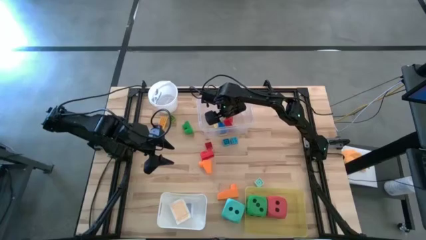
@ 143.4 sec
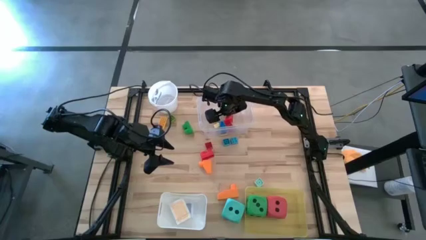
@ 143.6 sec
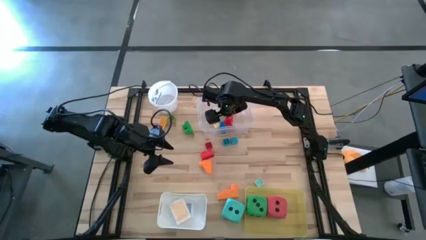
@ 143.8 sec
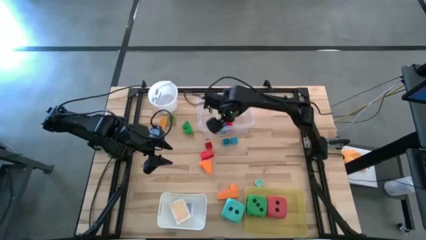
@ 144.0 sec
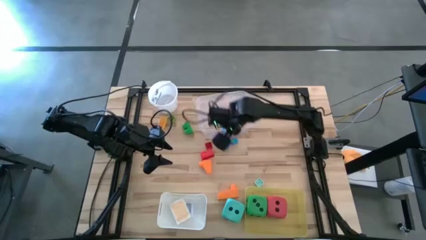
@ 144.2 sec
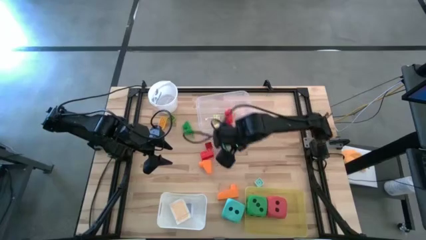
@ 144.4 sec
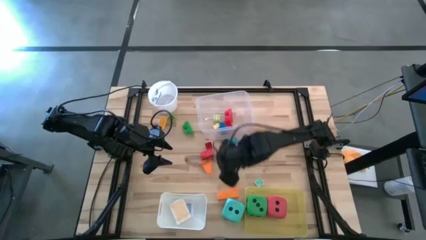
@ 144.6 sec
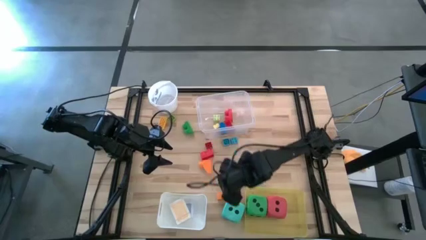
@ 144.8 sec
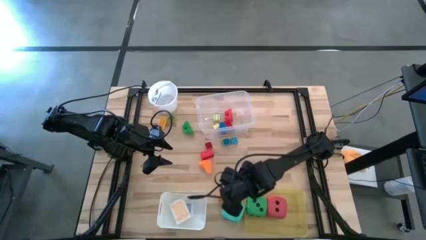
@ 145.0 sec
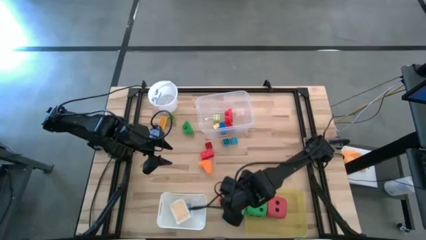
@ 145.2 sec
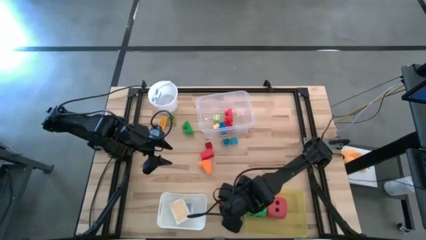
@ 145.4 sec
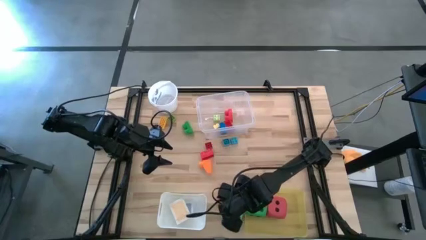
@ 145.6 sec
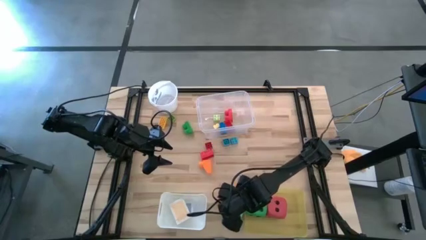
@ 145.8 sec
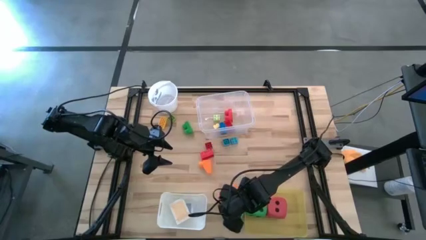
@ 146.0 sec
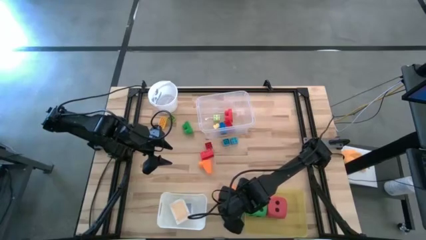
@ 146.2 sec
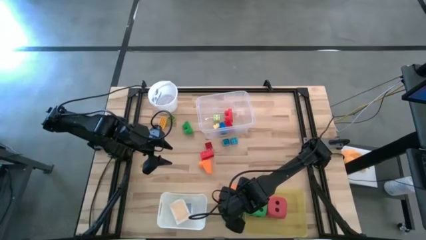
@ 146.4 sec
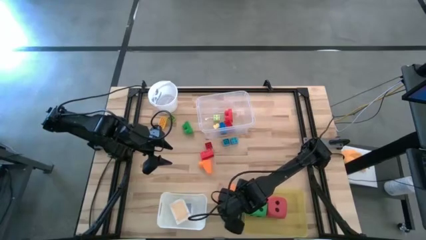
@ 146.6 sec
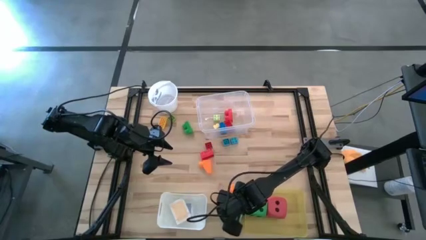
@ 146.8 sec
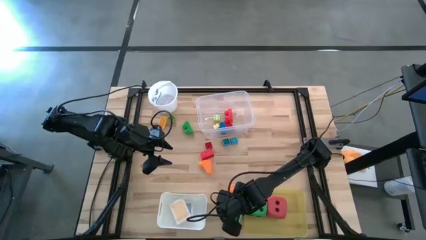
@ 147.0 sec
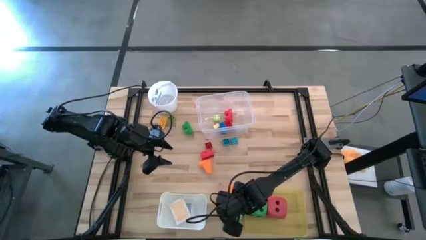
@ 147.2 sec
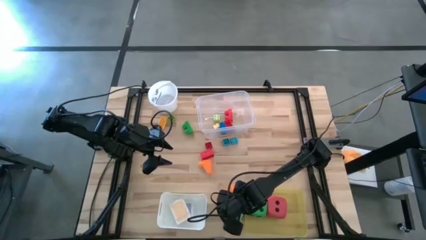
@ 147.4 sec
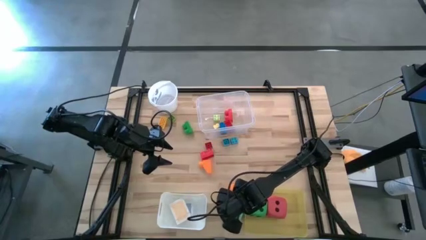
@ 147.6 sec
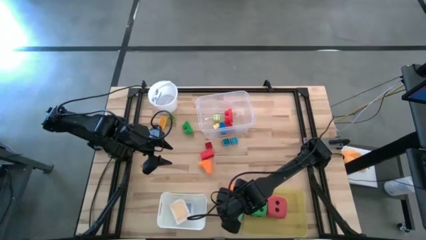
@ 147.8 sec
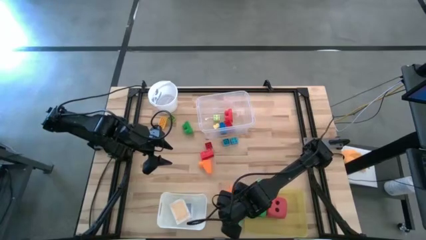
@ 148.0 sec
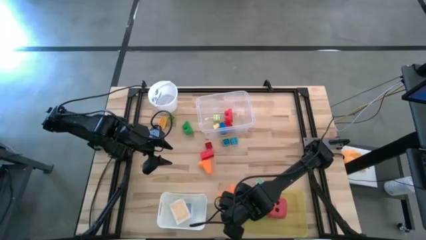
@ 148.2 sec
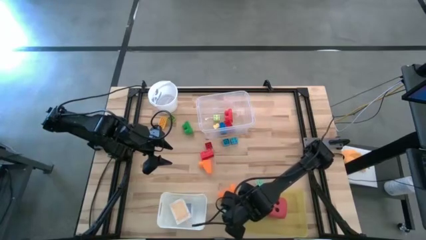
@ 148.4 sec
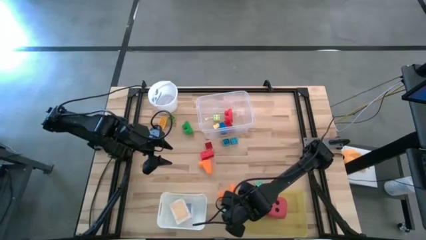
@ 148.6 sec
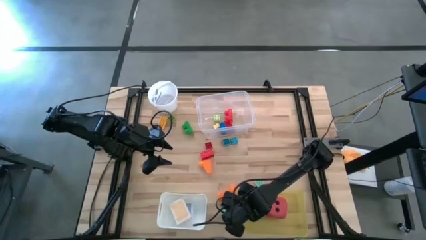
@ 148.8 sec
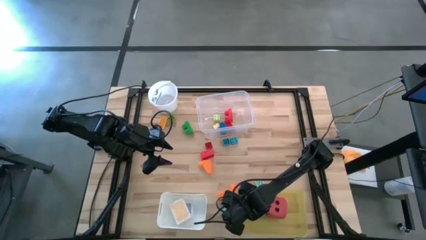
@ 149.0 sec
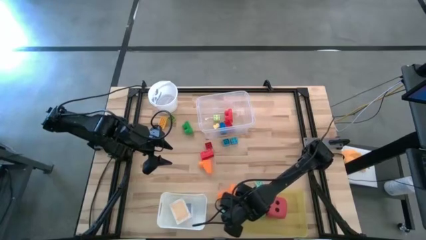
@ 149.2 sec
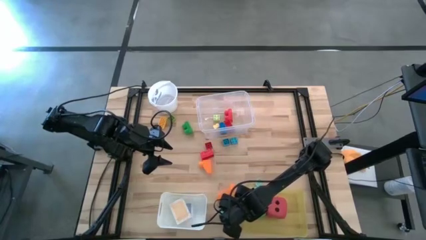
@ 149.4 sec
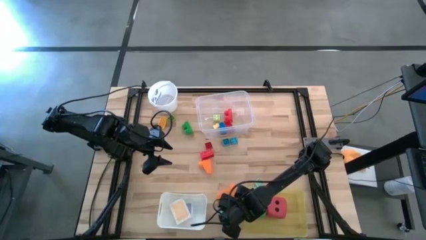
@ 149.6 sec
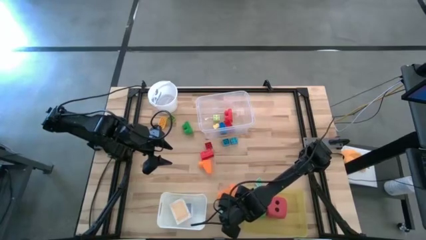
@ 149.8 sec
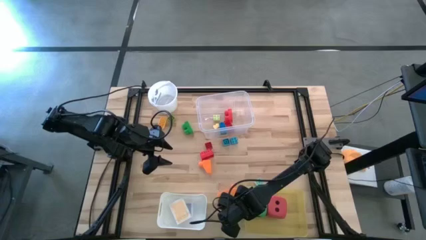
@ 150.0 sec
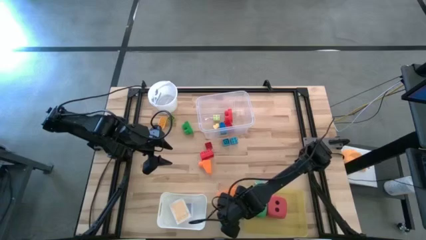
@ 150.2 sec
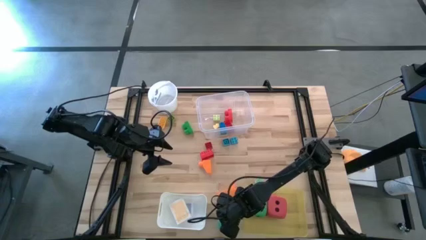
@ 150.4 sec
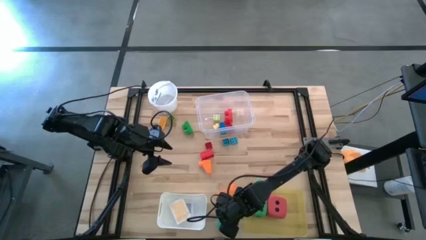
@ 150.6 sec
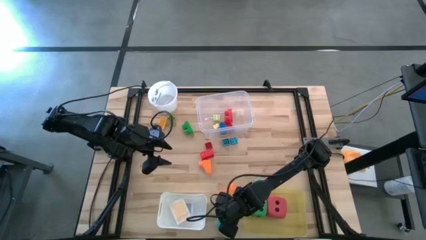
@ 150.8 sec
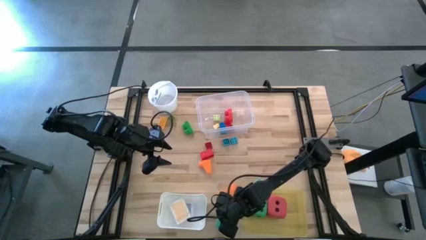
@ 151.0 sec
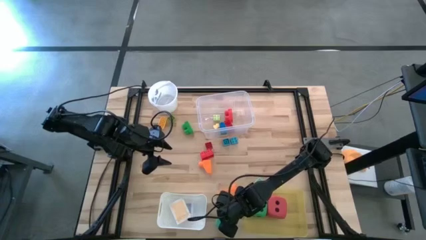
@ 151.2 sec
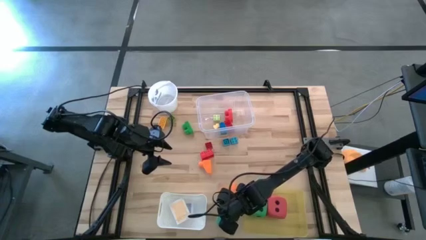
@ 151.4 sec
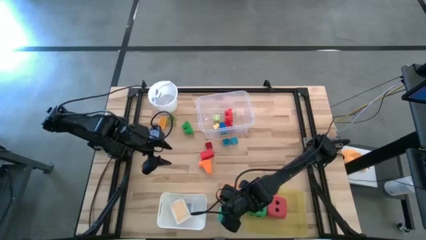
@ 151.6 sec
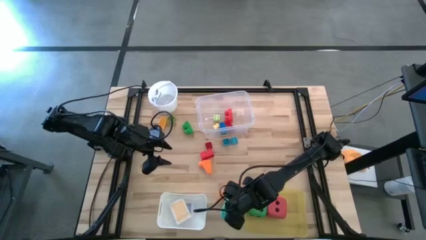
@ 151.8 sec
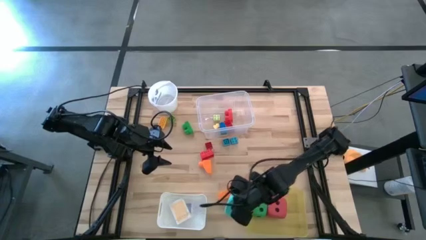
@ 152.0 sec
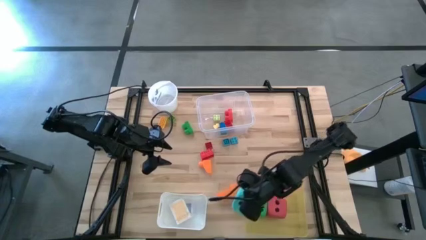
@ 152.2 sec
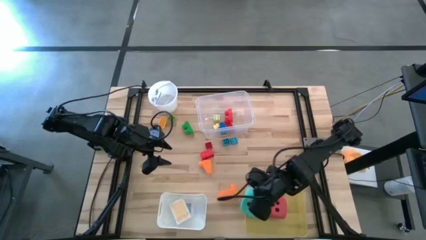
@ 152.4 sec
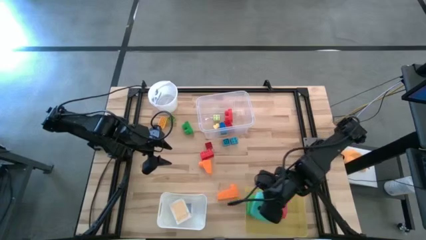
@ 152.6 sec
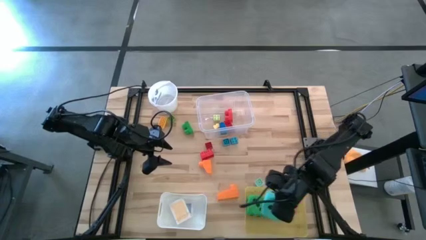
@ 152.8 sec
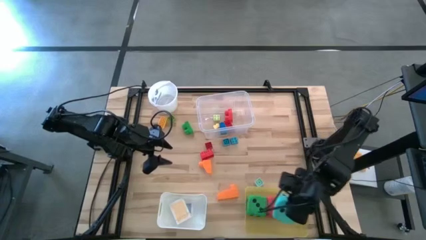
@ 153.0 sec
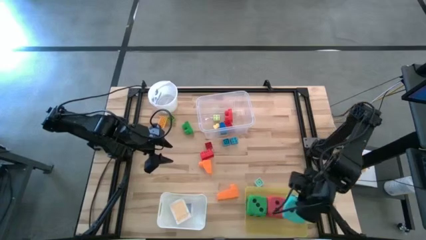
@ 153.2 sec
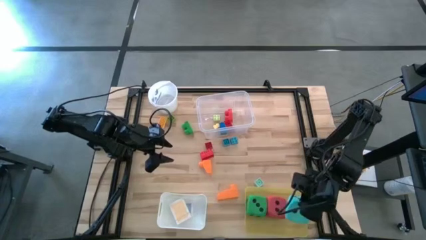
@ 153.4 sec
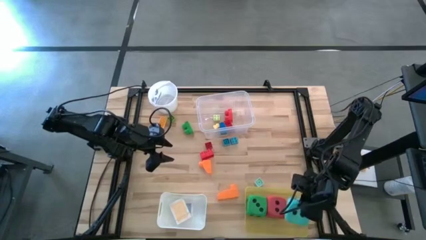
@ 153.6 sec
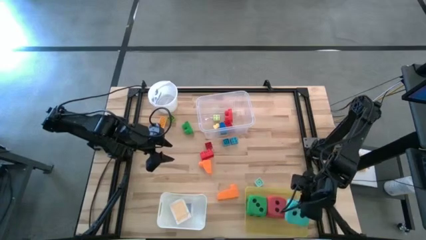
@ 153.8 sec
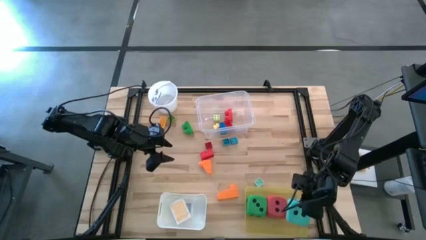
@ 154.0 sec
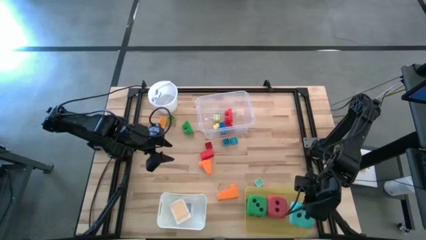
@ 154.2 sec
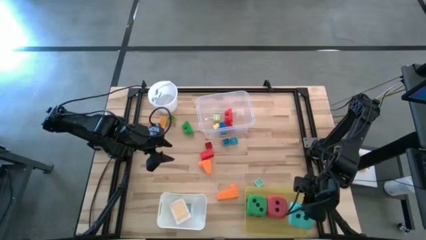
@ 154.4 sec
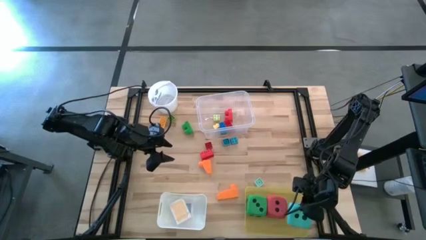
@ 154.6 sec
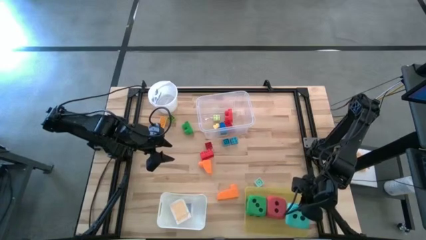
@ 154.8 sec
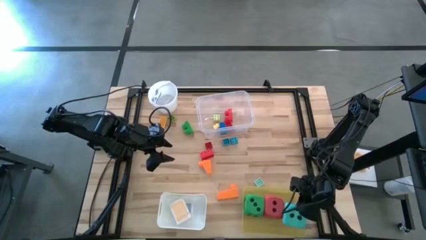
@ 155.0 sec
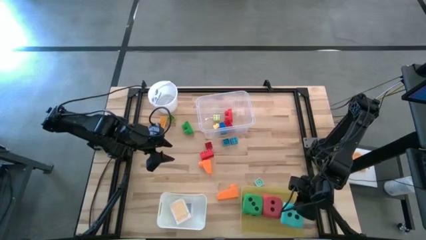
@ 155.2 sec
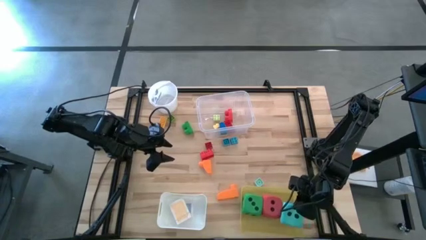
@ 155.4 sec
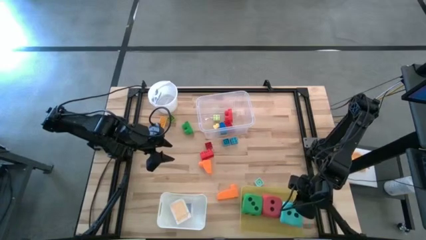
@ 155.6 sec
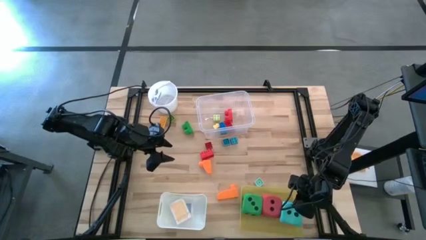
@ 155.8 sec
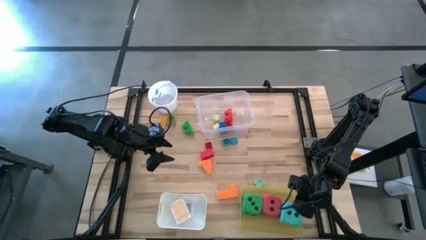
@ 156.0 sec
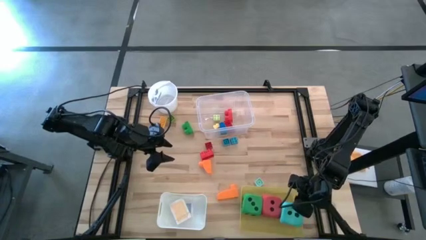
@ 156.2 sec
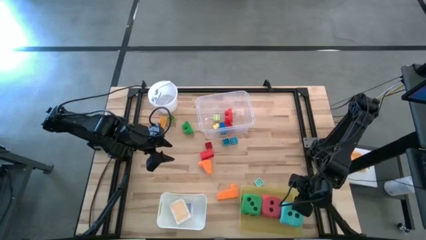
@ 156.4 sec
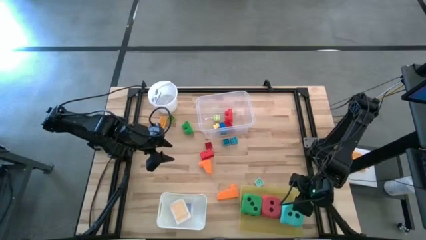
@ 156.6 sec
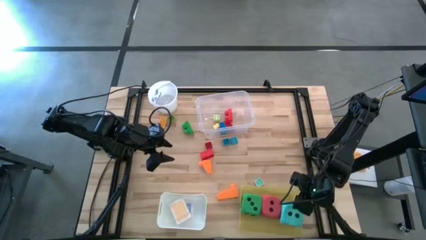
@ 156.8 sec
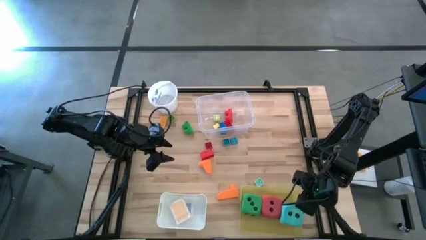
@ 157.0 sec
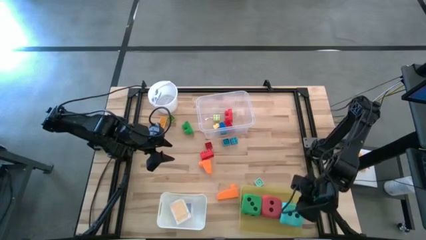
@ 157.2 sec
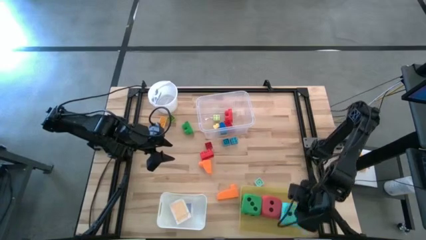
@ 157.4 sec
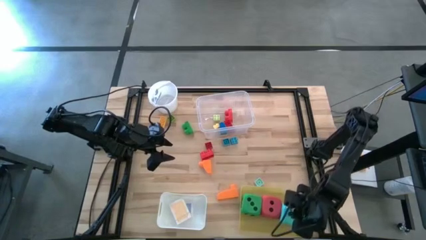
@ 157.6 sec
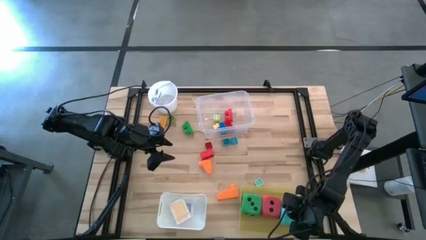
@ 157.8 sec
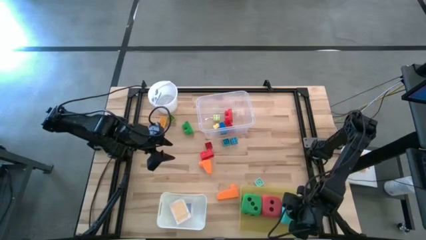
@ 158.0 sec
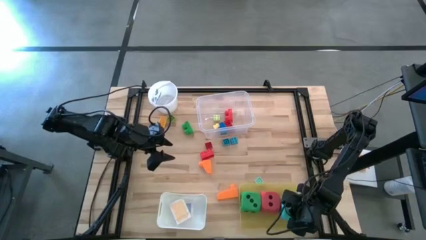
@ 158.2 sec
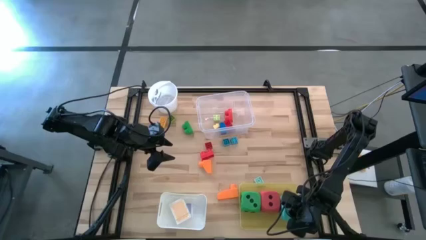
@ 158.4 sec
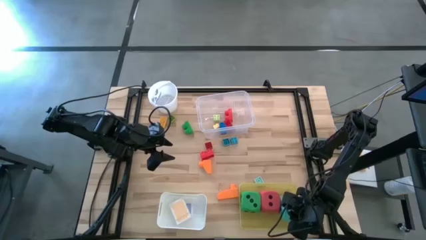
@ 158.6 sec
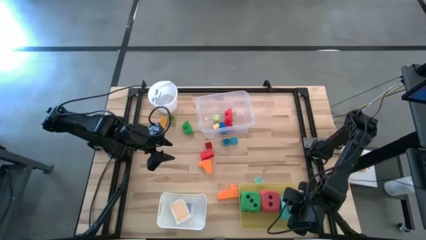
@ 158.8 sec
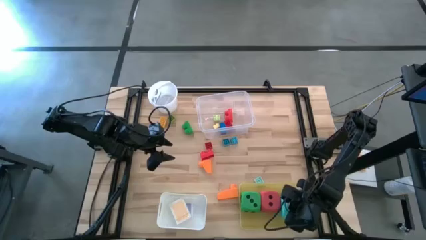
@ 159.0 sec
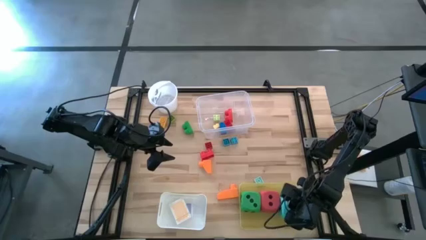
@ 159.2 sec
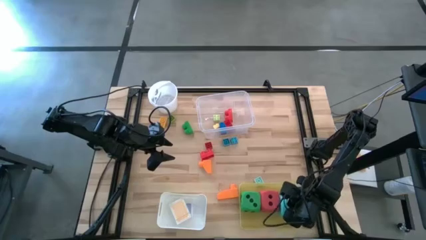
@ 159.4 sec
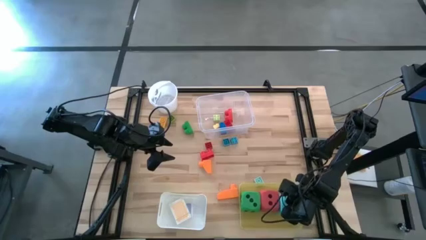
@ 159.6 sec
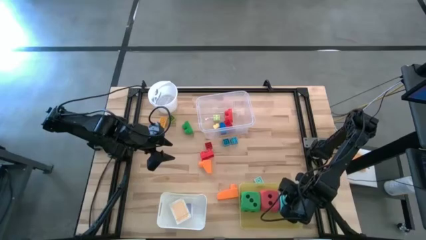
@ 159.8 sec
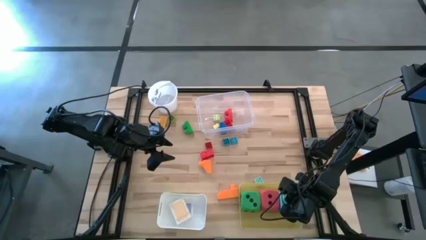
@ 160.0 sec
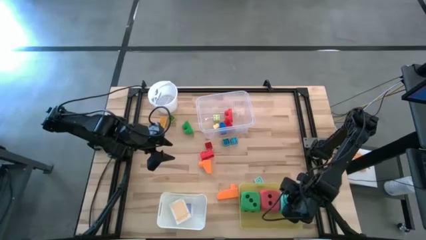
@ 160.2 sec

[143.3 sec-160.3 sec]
Task: Pick & Place Toys
Put the blue dice into the yellow bin
